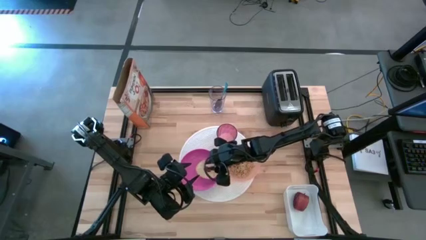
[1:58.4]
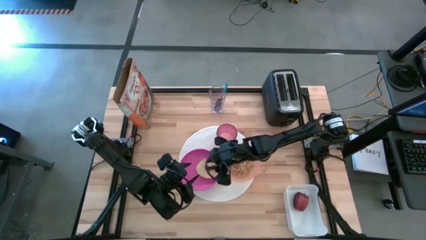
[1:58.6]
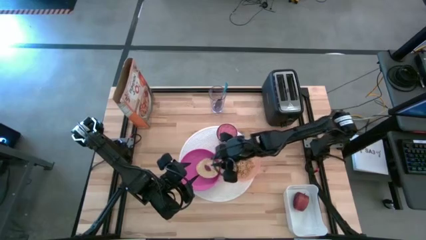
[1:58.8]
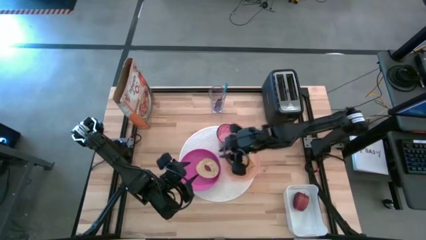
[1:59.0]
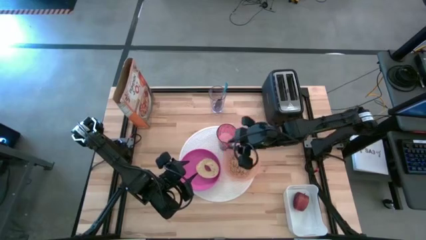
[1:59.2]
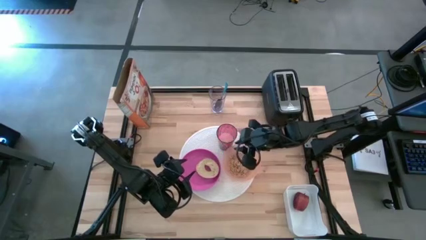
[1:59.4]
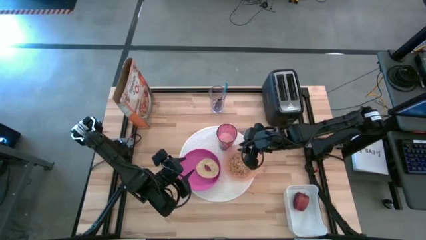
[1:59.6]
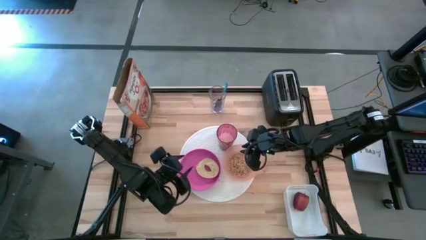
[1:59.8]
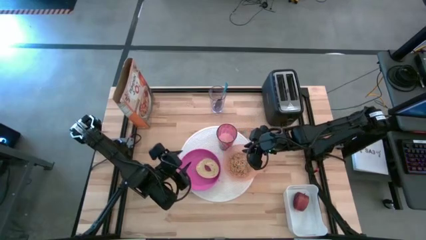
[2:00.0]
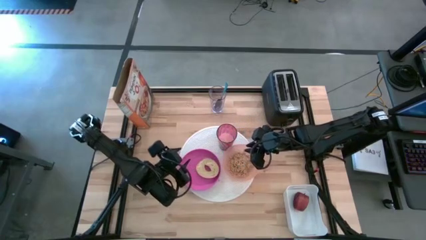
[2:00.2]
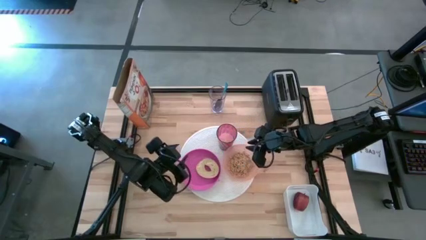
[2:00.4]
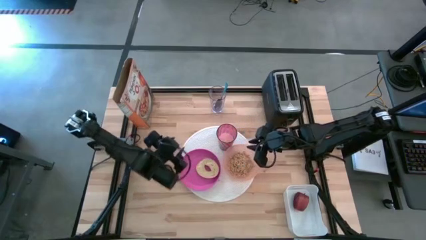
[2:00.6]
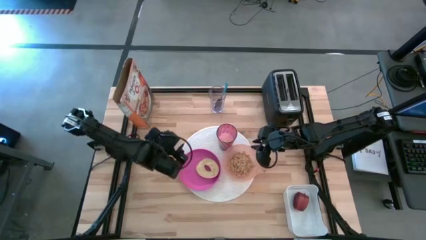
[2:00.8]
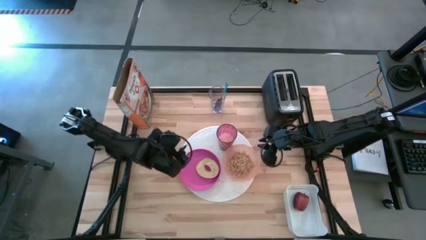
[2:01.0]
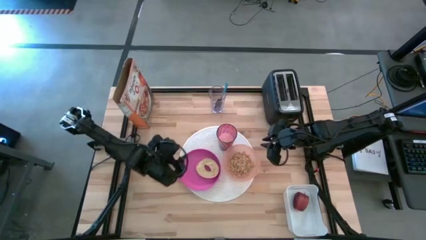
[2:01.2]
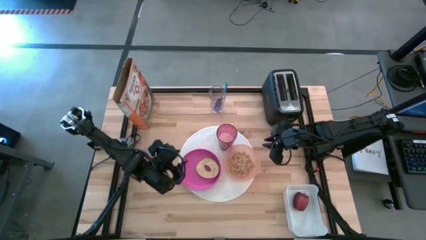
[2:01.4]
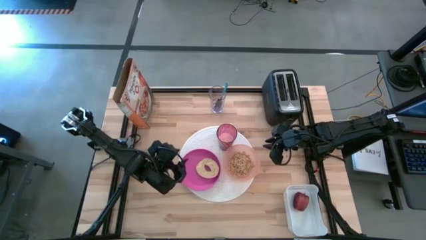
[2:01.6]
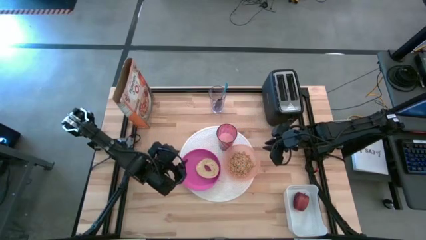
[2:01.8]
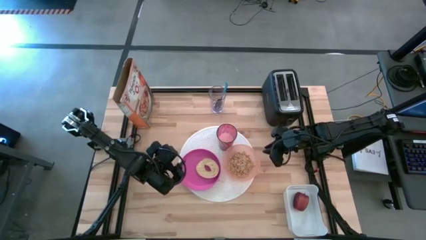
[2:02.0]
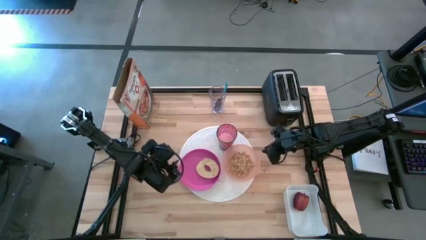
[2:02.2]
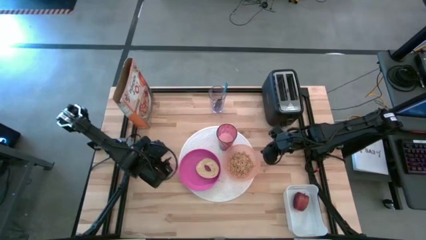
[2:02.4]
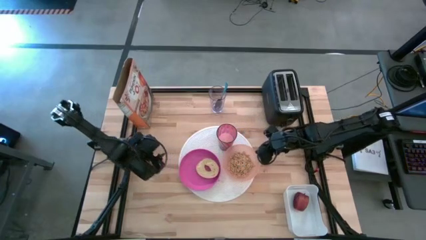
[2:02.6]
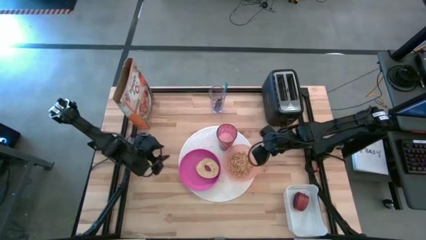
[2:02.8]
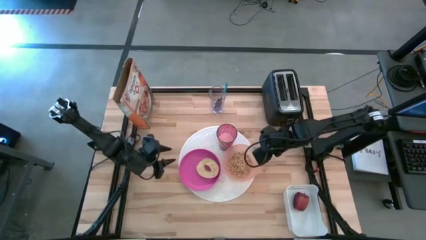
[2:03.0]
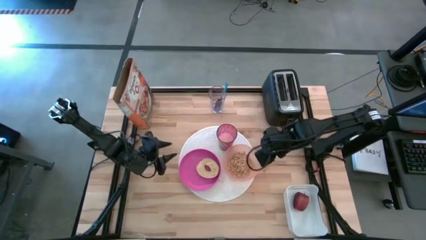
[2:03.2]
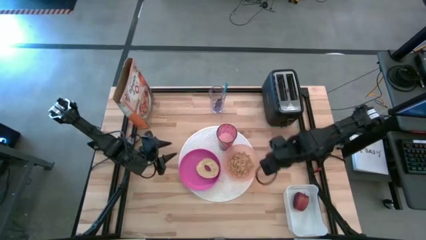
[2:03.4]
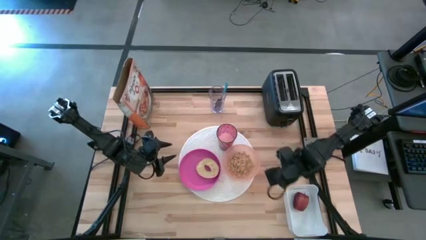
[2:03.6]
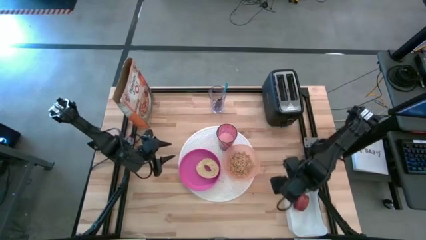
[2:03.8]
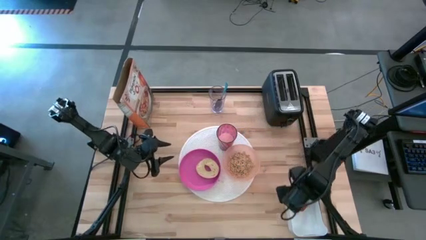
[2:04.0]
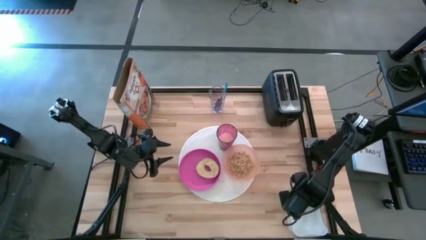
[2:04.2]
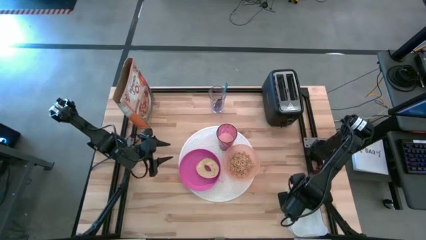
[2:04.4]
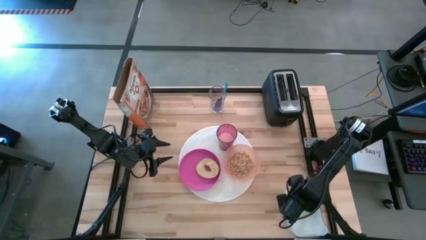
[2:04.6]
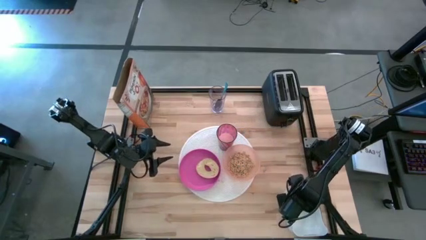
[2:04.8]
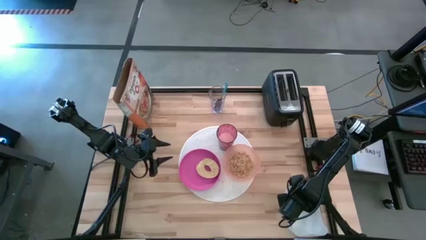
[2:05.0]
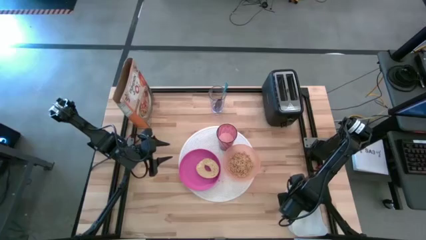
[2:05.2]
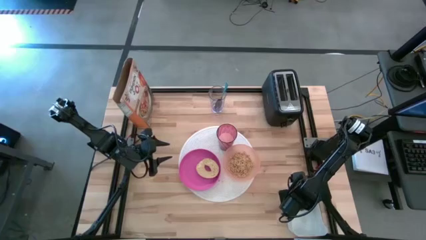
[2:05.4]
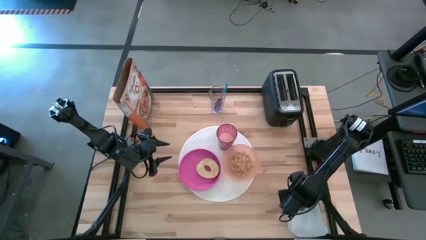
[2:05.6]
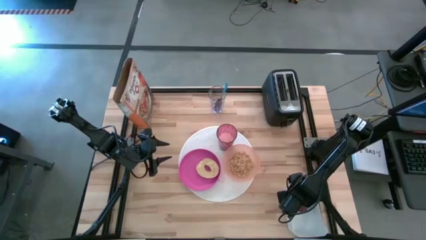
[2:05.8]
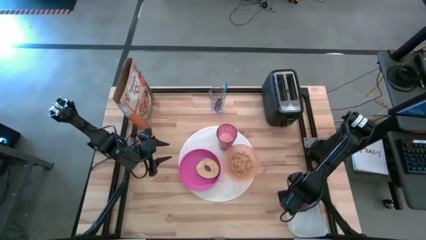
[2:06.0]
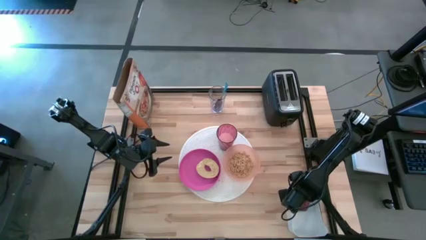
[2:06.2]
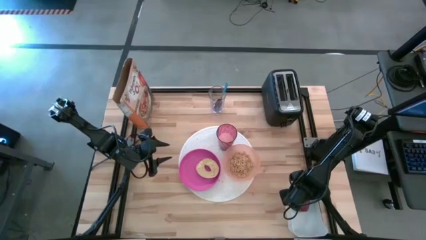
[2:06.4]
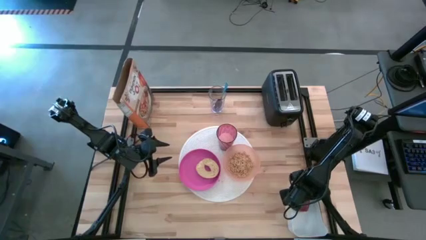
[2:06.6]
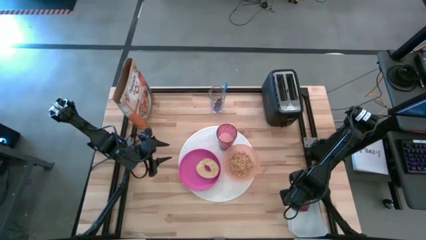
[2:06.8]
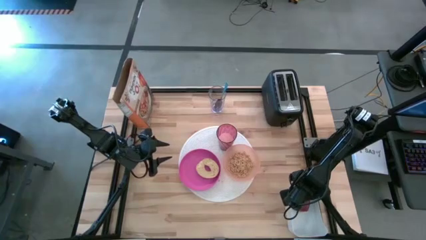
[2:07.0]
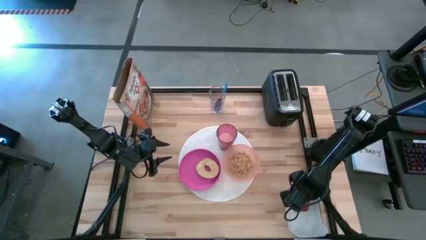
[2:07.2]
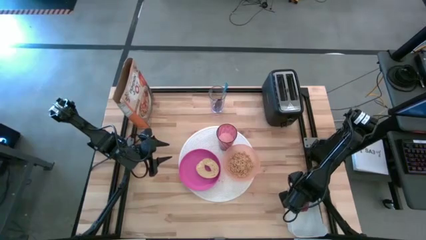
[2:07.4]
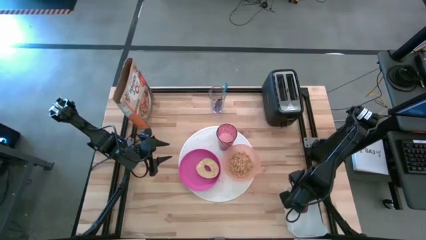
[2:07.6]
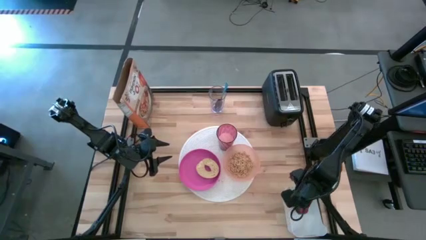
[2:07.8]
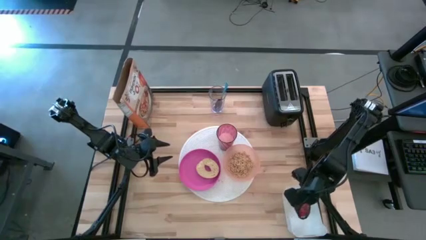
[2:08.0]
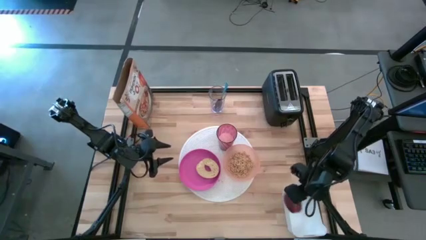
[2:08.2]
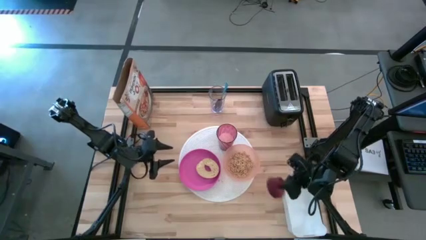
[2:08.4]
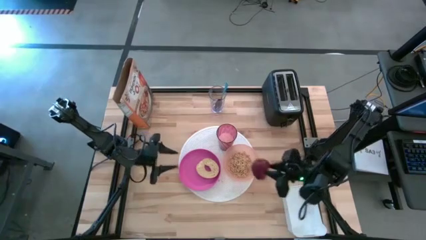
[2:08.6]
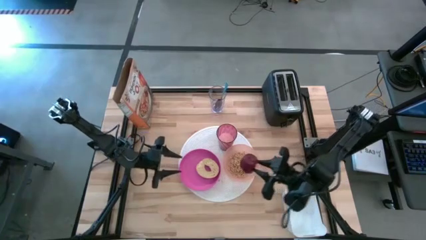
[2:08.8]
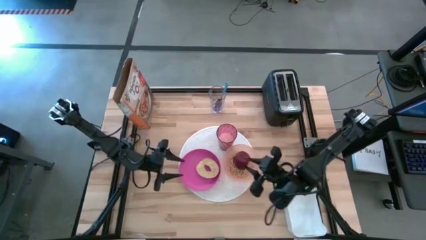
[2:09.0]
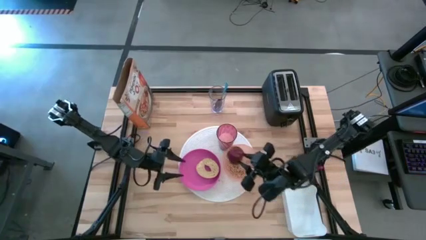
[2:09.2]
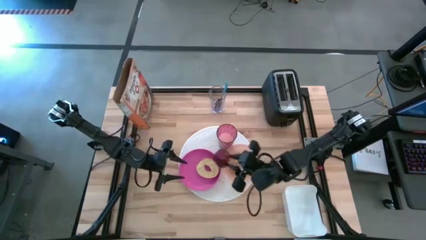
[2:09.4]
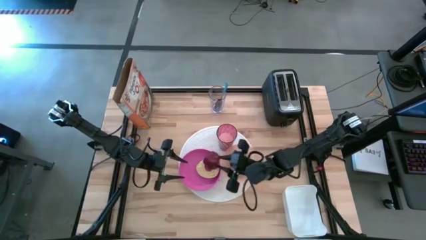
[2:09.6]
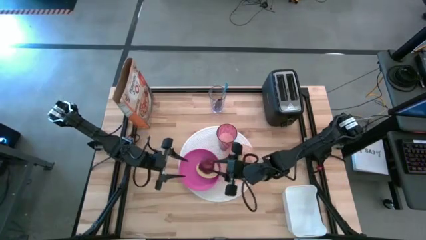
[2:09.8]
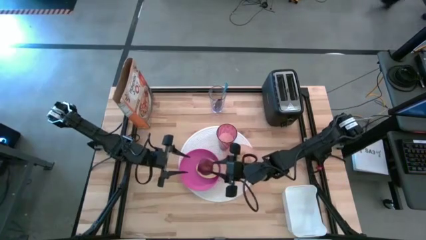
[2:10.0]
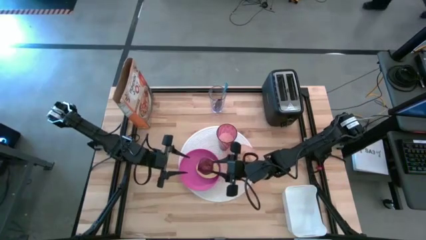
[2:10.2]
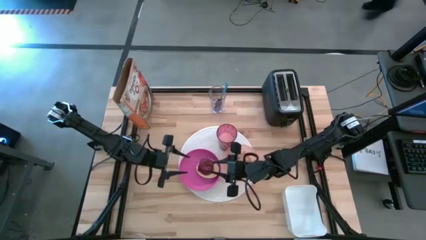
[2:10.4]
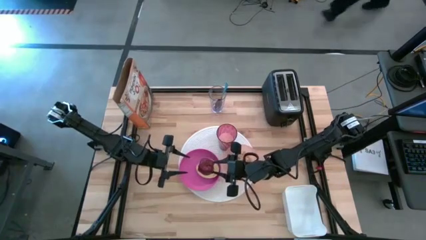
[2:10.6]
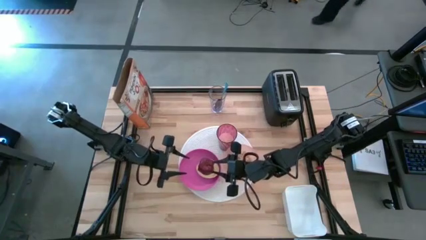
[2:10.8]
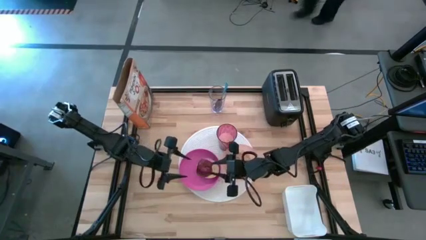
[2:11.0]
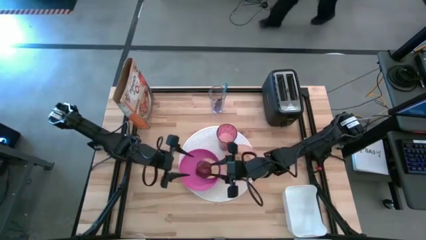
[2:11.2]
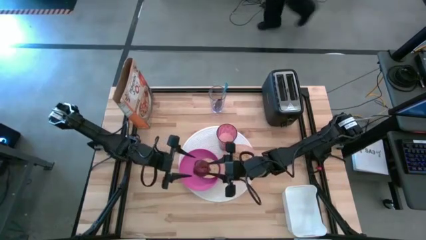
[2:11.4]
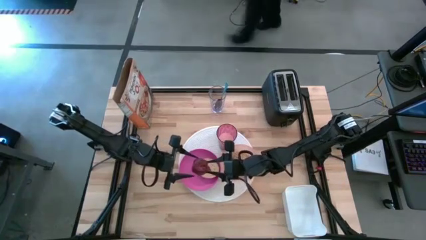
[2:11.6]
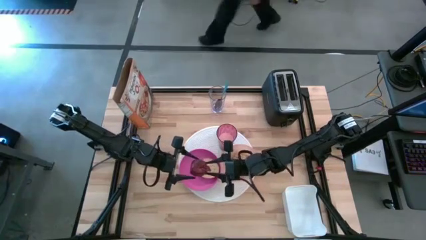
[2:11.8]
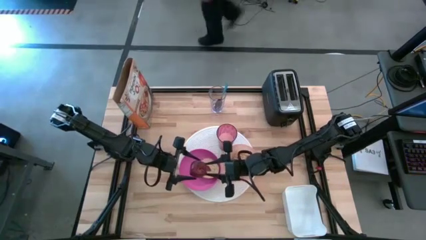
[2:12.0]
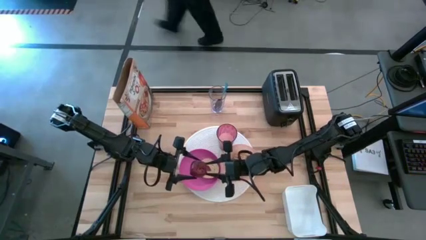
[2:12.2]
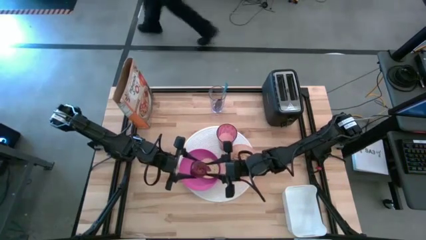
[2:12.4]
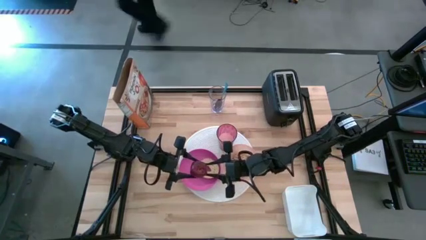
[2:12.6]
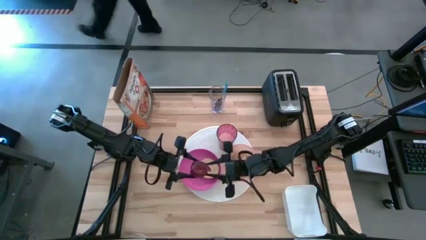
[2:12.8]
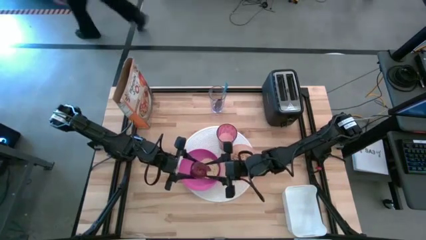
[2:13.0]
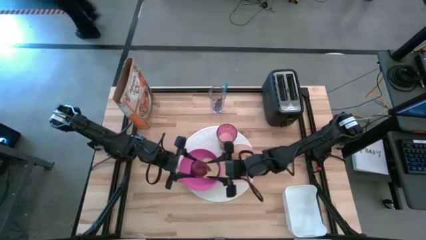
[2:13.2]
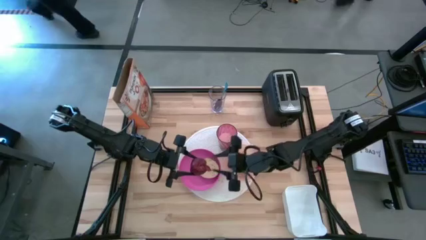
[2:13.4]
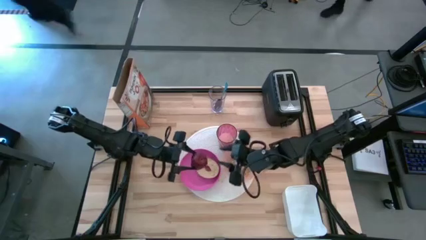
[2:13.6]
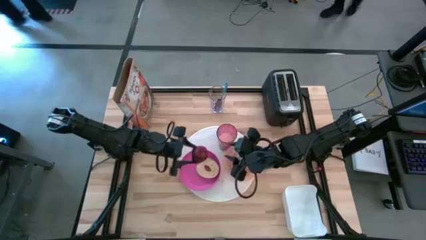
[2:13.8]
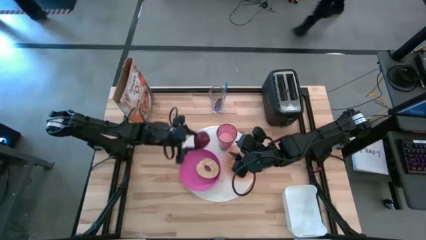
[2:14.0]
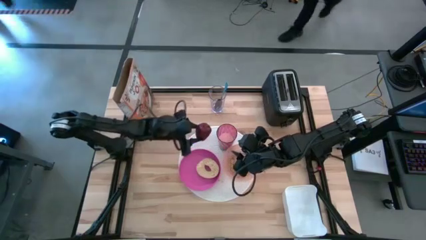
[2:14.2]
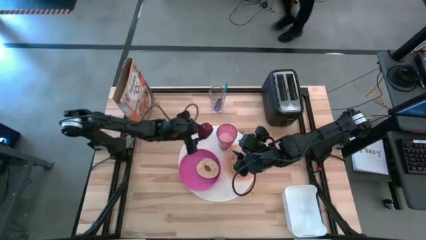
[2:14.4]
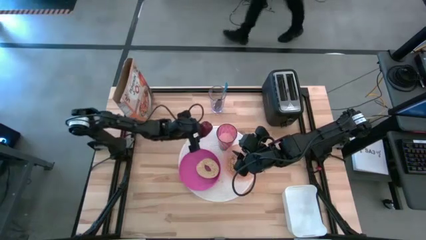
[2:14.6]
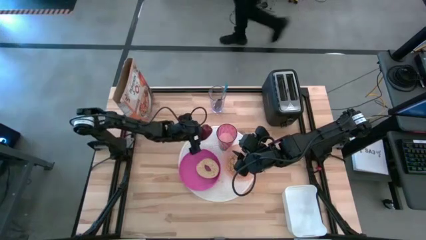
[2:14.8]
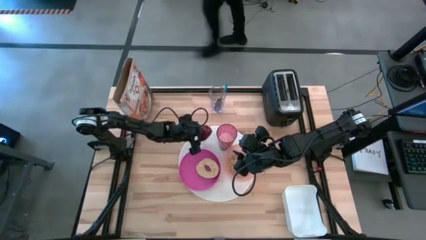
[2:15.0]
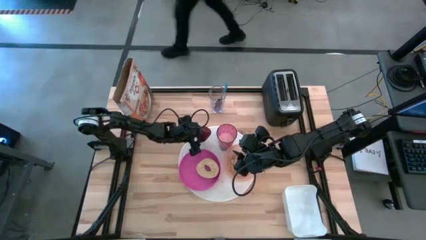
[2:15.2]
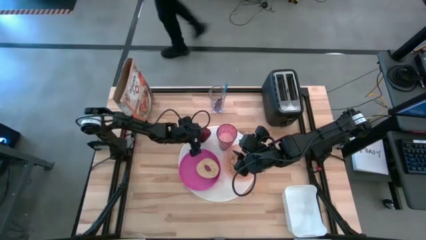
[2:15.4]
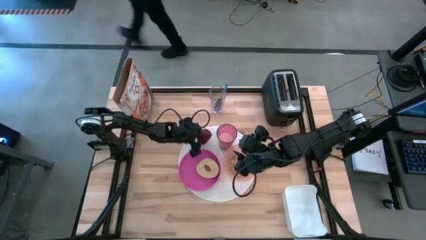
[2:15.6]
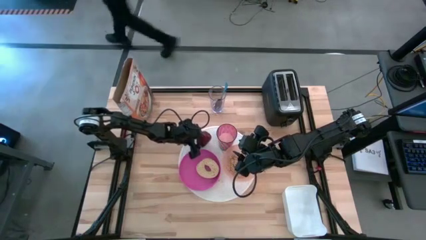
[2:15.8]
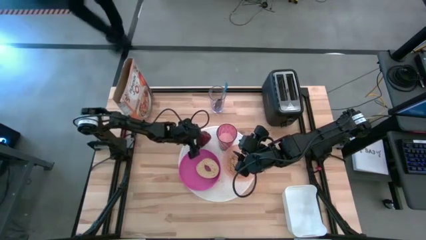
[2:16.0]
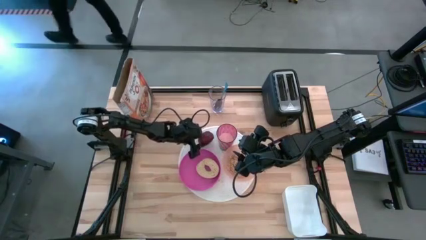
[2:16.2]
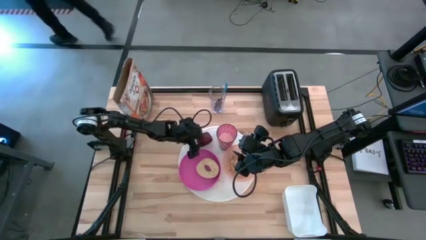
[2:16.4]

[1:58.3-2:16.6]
Task: Arrange a breakfast setting
Put the apple on the white tablemat to the top of the pink plate
